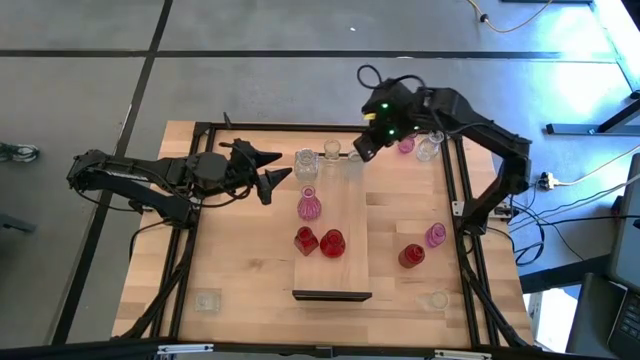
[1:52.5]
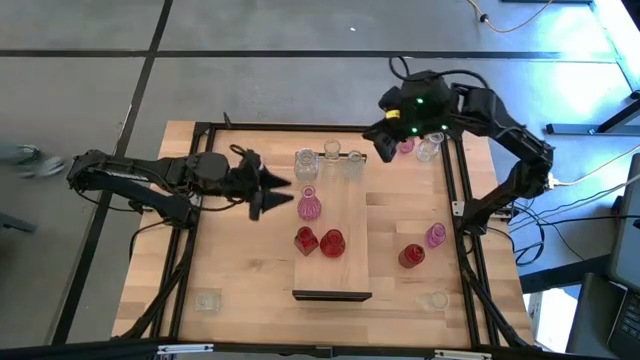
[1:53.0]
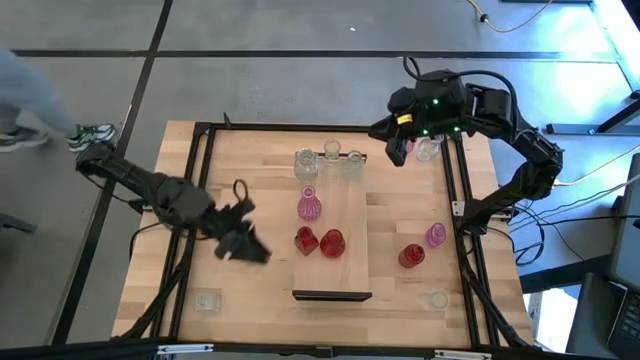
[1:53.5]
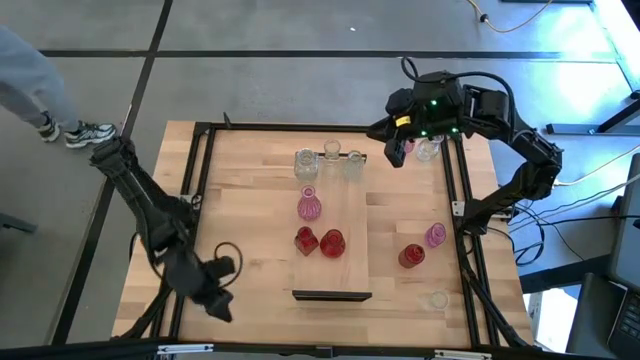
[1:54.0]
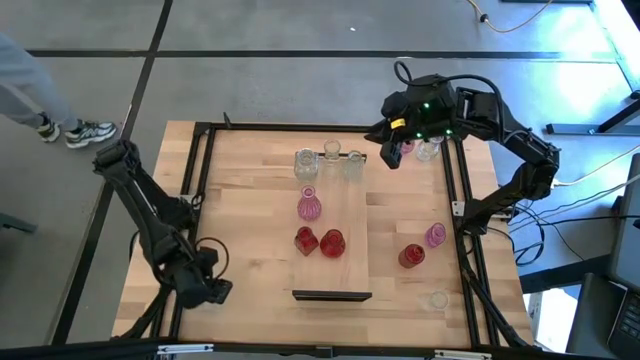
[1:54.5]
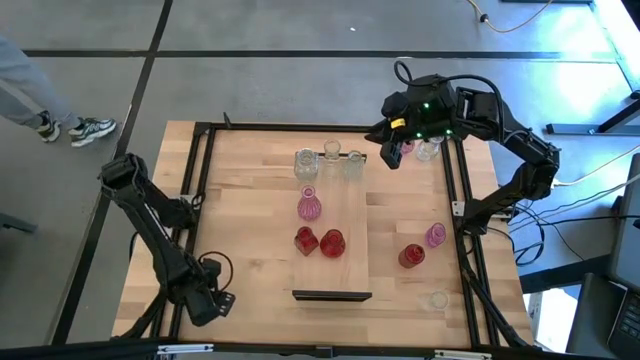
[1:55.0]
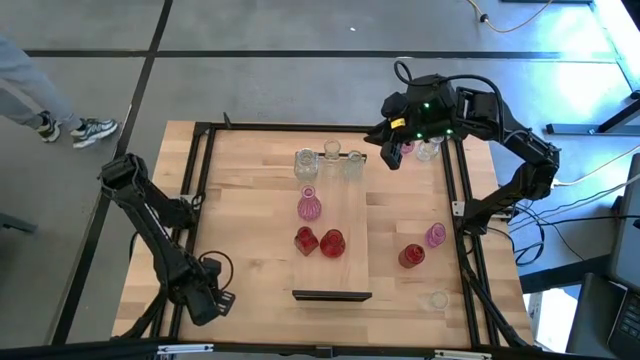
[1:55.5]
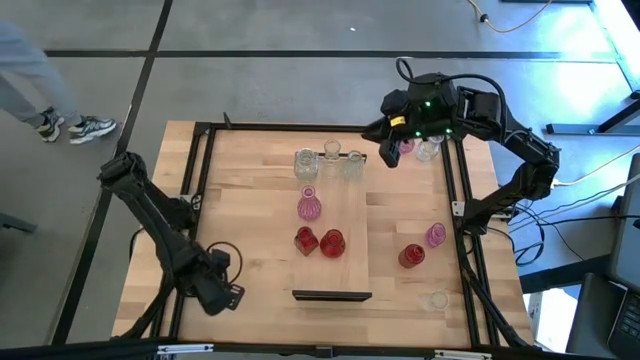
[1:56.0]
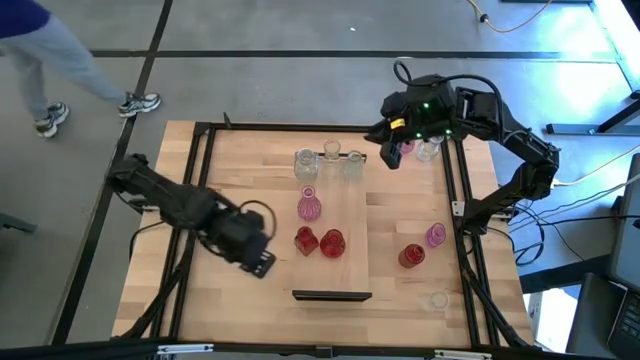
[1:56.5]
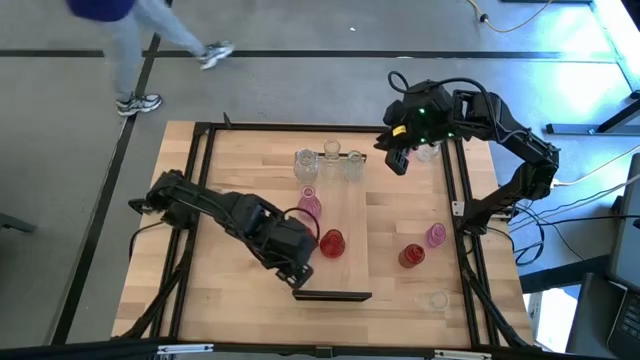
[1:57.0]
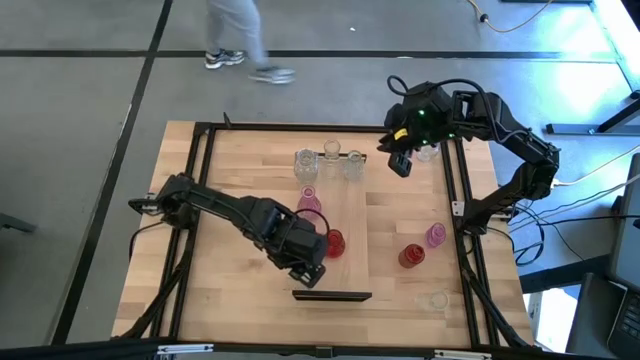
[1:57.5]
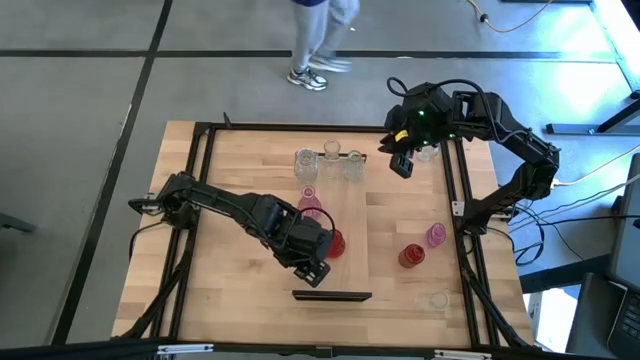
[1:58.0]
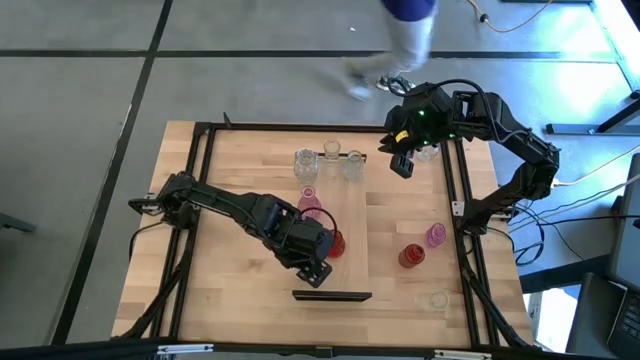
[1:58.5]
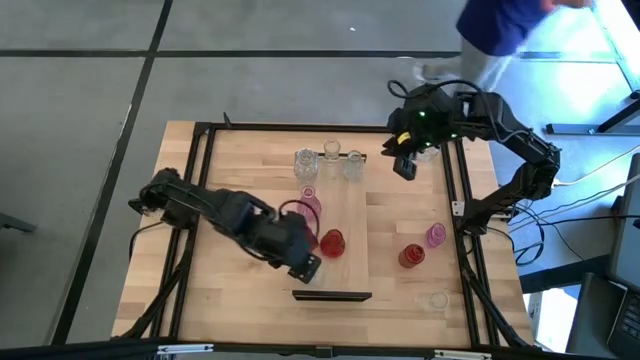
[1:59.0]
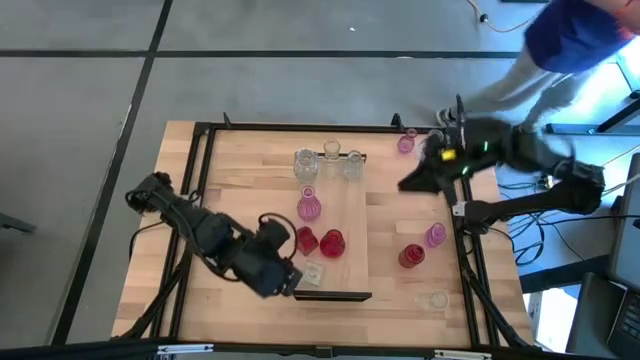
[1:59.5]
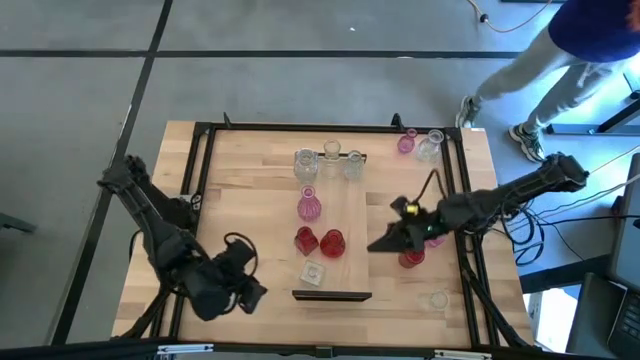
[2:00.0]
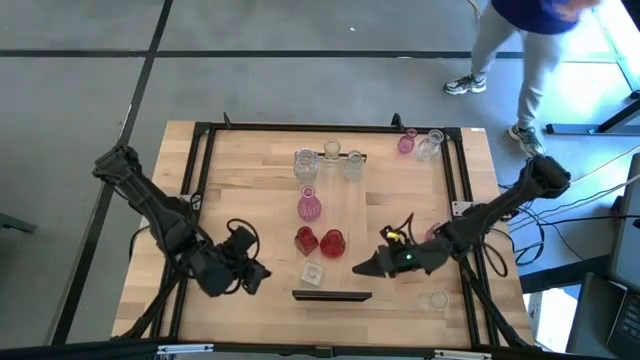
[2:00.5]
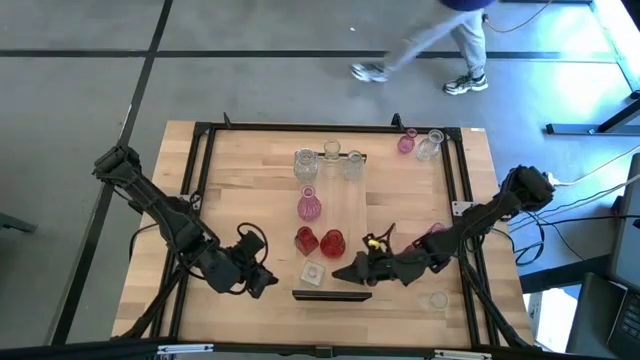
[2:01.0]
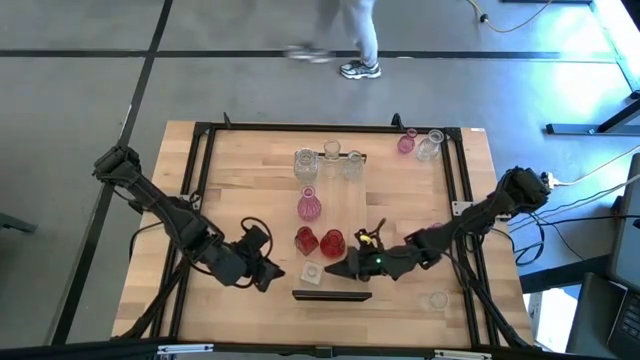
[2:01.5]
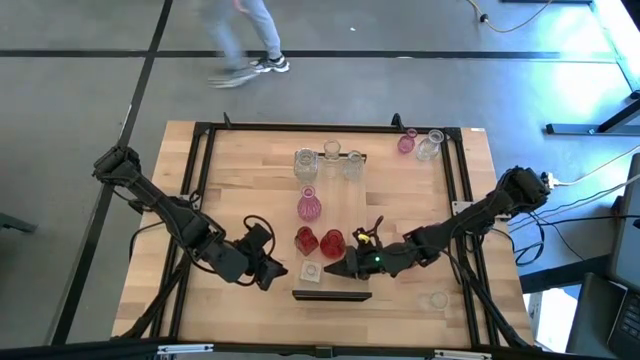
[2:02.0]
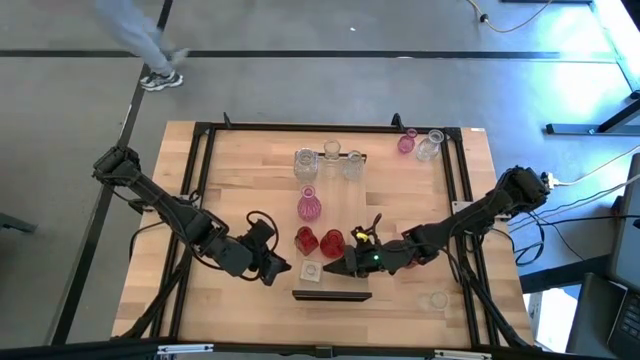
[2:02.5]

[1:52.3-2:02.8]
Task: sort vases onto shelf
Put the transparent vase on the shelf

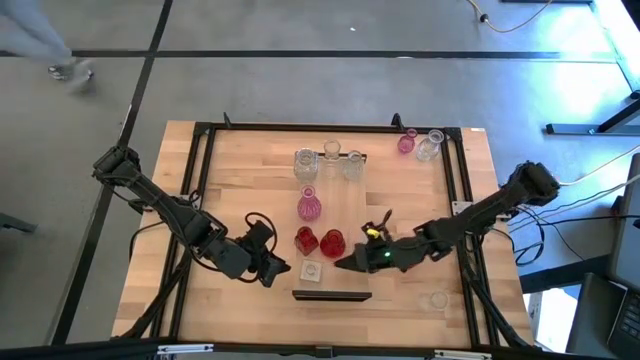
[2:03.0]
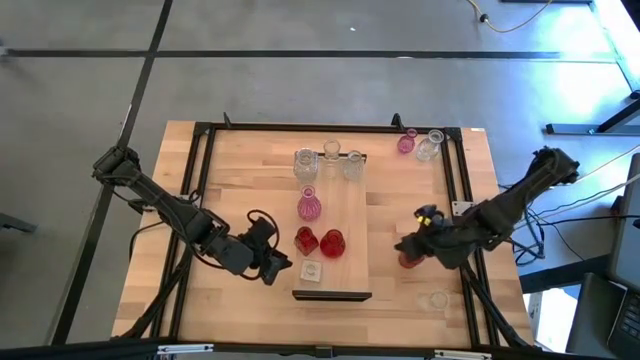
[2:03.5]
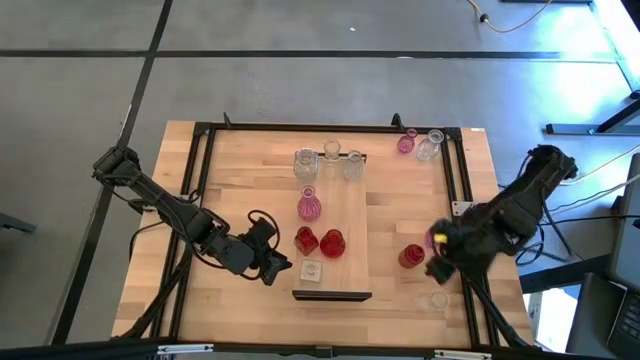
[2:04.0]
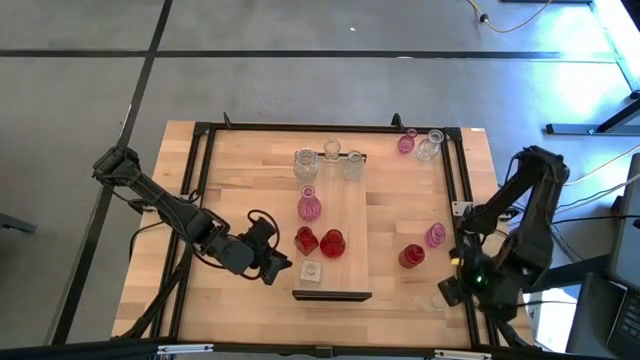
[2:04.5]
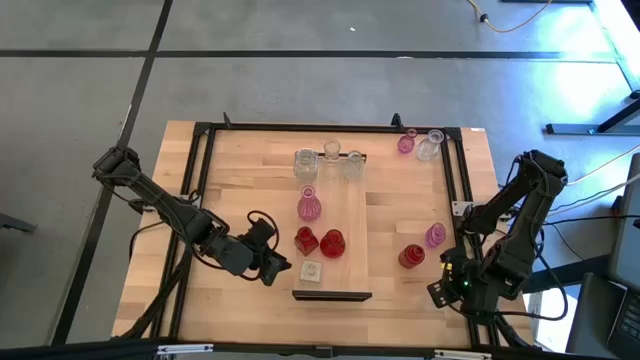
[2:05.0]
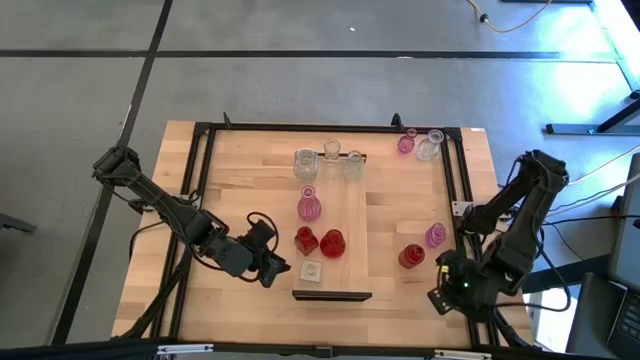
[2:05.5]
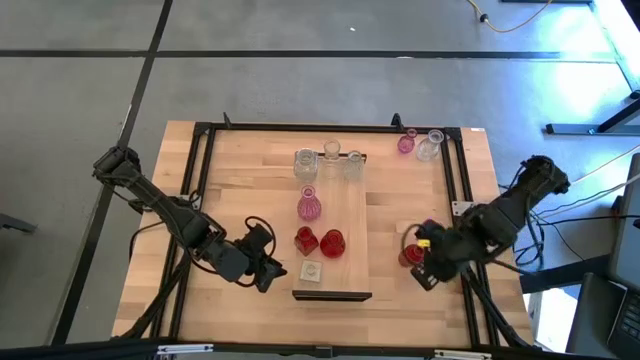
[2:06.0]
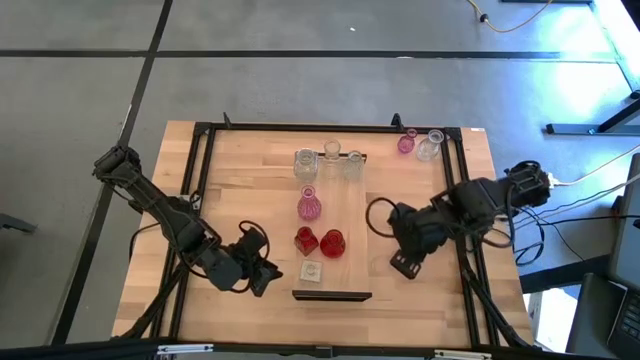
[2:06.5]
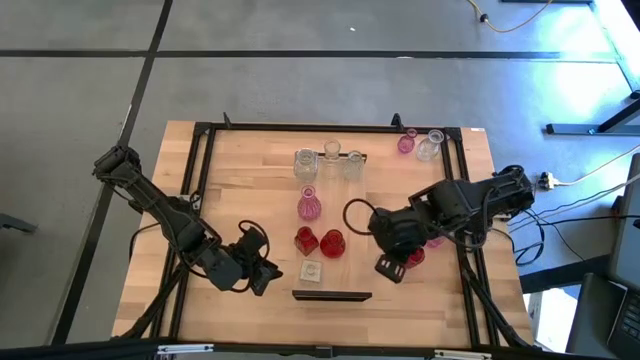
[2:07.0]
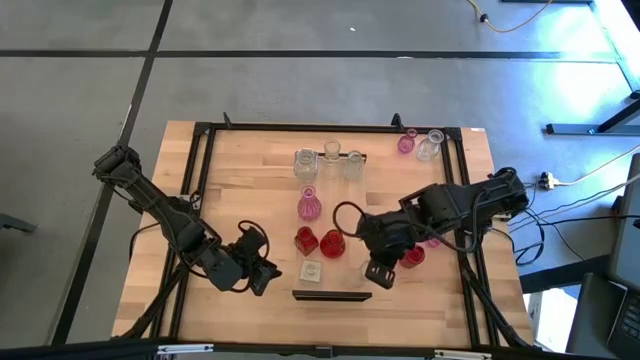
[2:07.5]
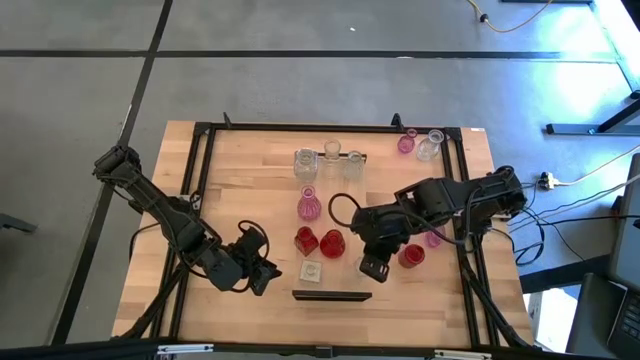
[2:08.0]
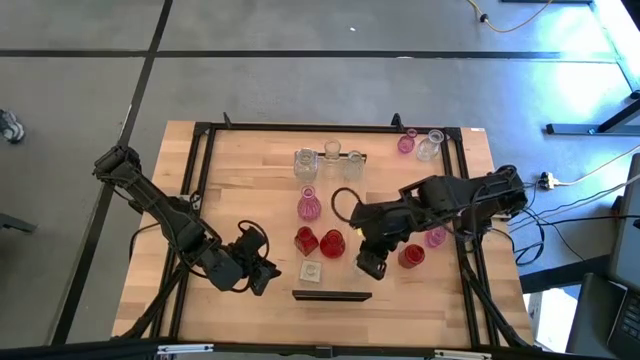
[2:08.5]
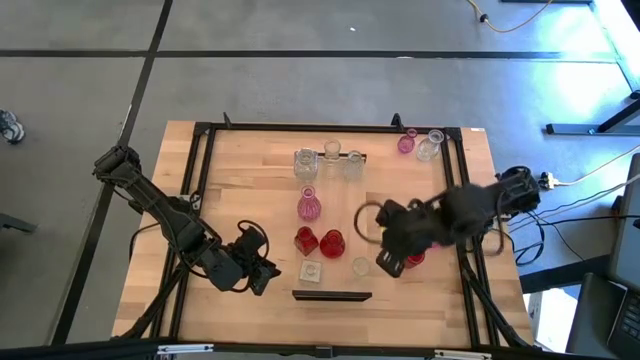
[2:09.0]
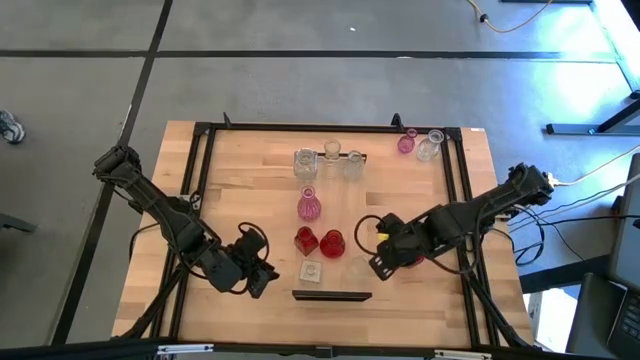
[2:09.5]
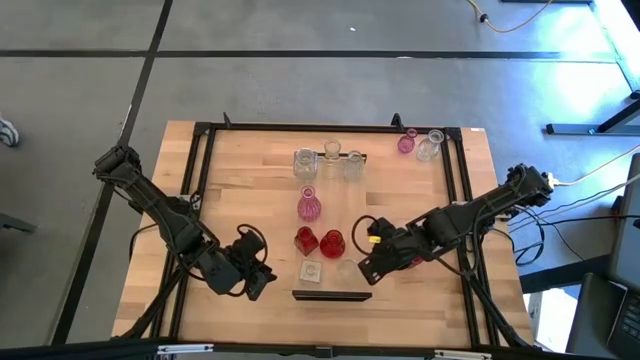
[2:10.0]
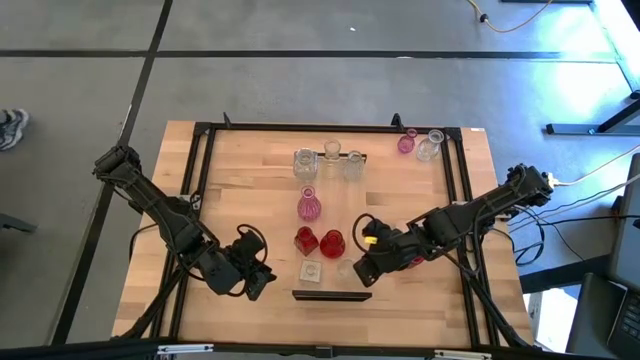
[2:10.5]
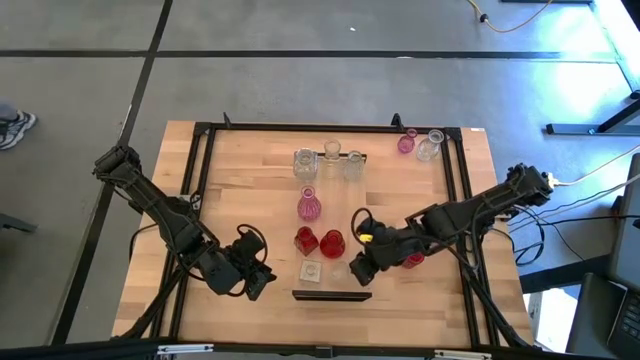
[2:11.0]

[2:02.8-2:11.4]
Put the transparent vase on the shelf aligned with the other transparent vase

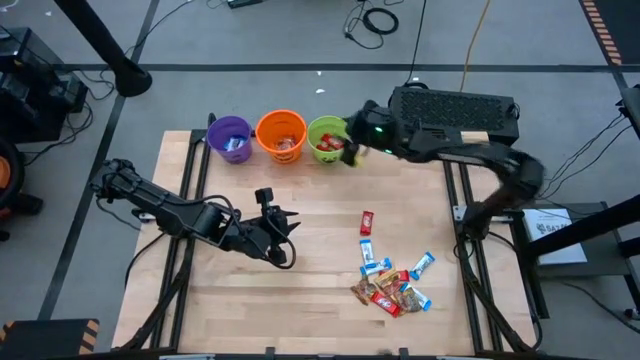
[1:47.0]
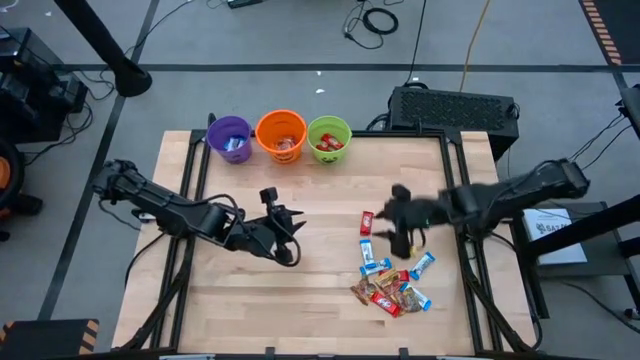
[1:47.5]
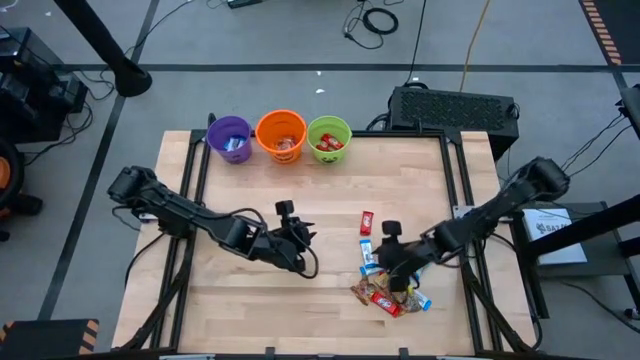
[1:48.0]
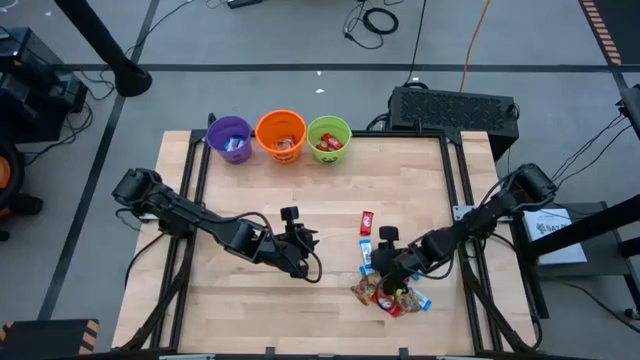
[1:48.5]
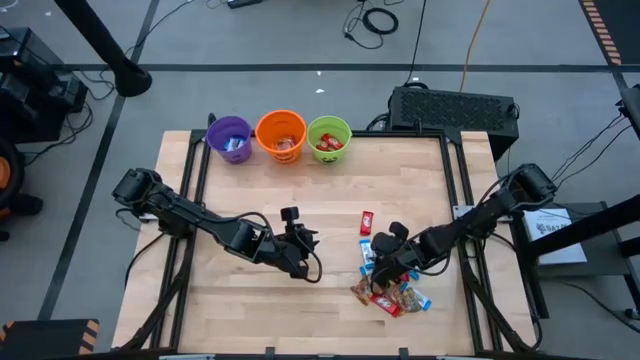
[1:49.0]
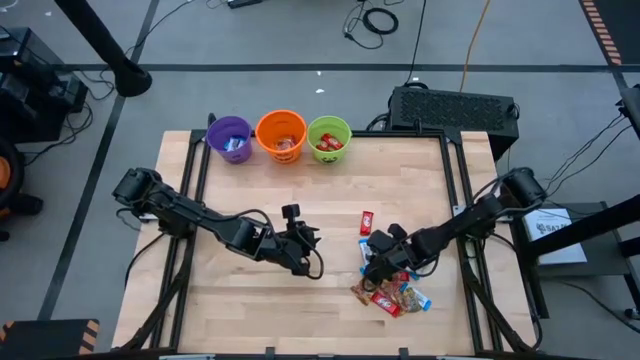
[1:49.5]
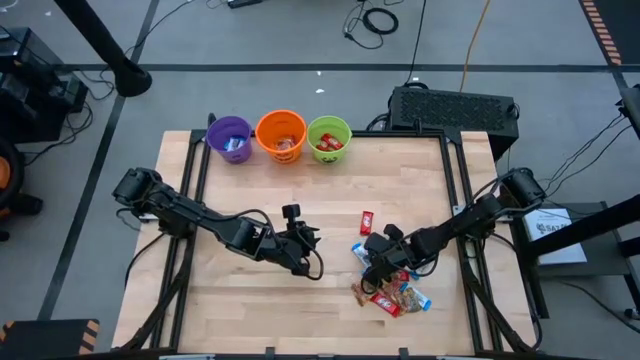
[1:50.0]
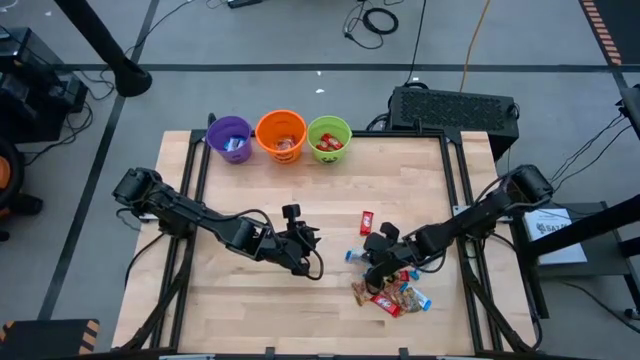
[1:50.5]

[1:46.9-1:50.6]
Task: Sort candy by brand, put in halloween buckets
Put the white chocolate bar into the violet bucket
